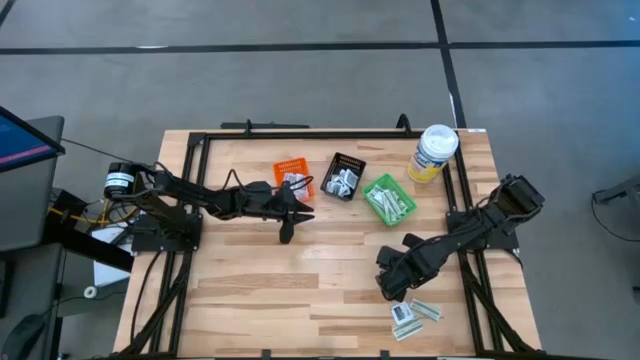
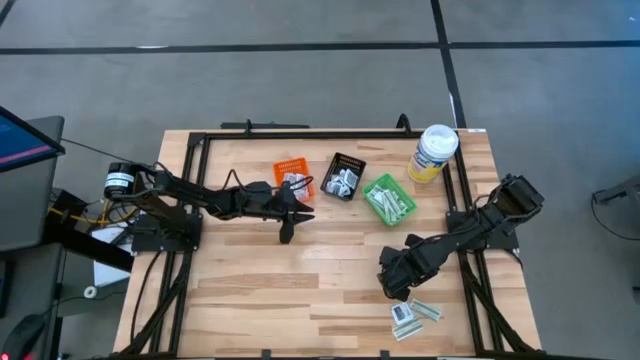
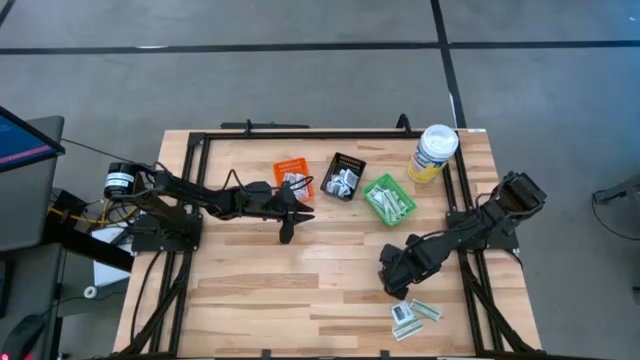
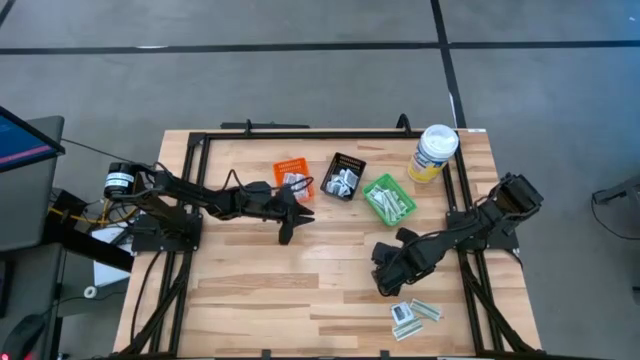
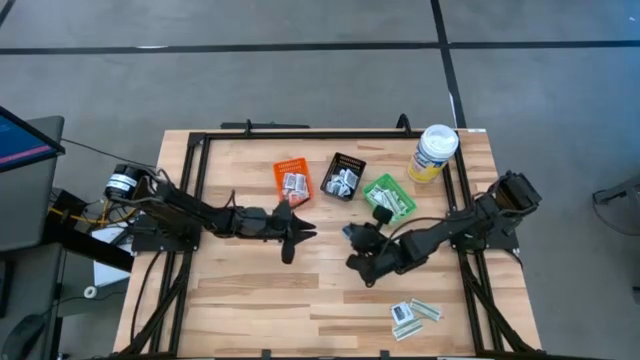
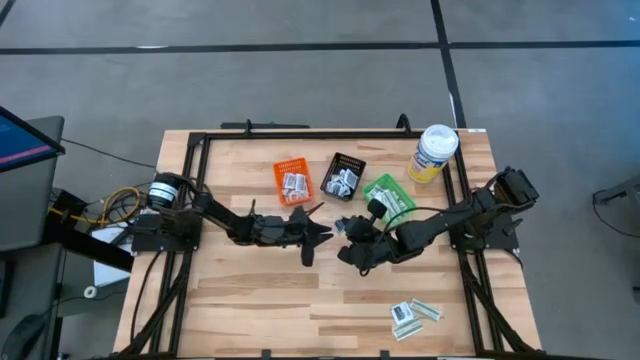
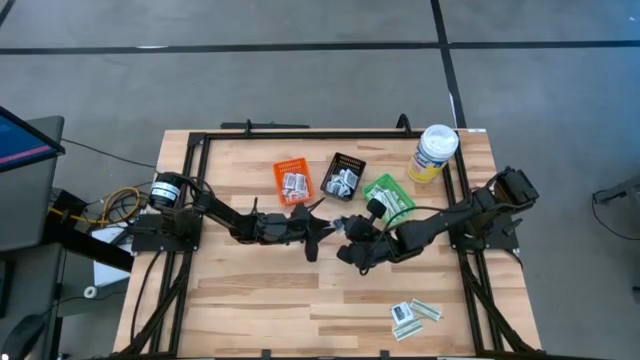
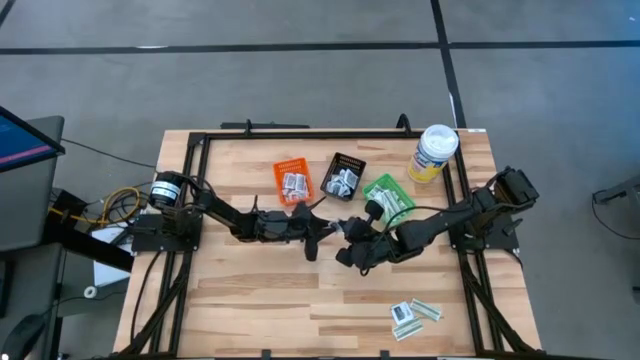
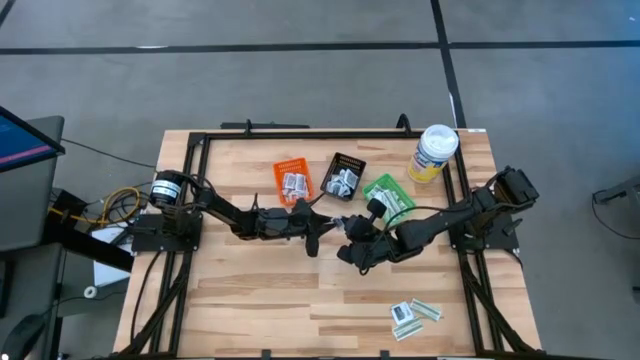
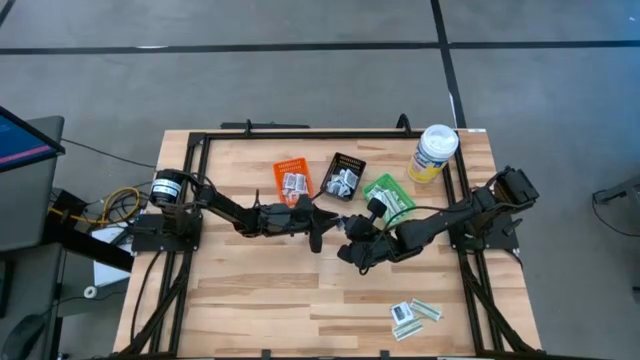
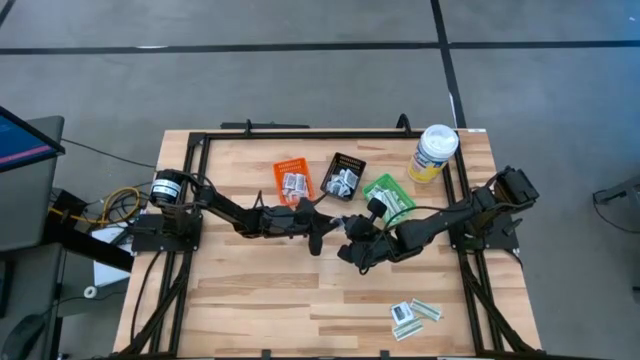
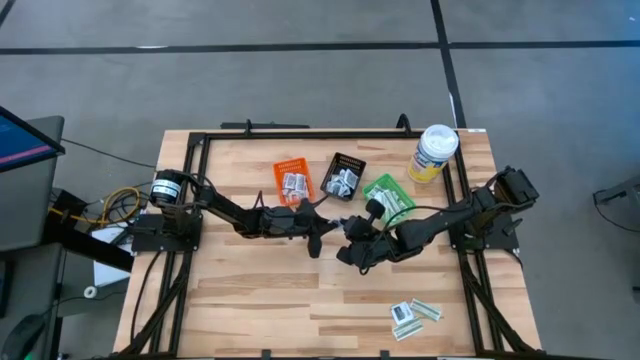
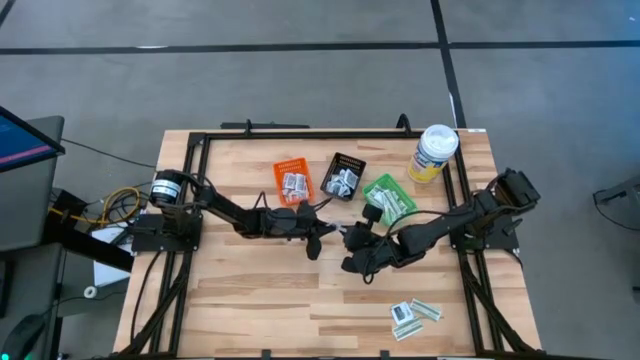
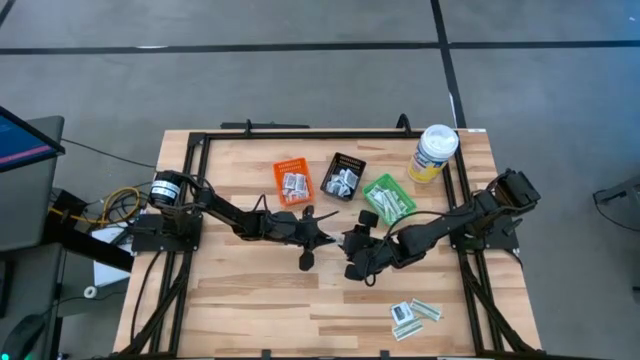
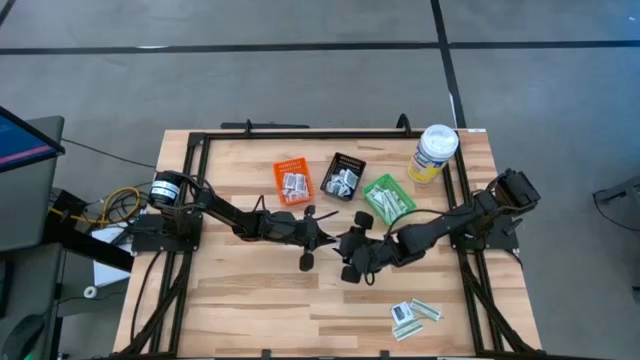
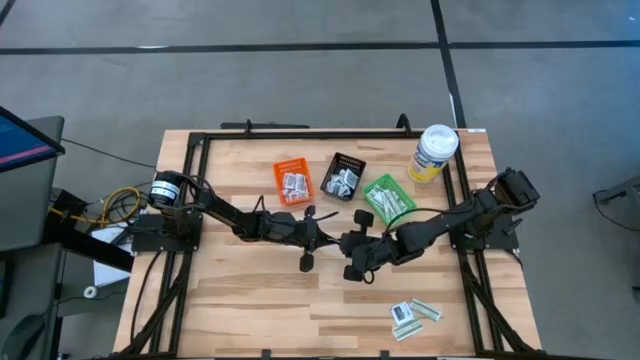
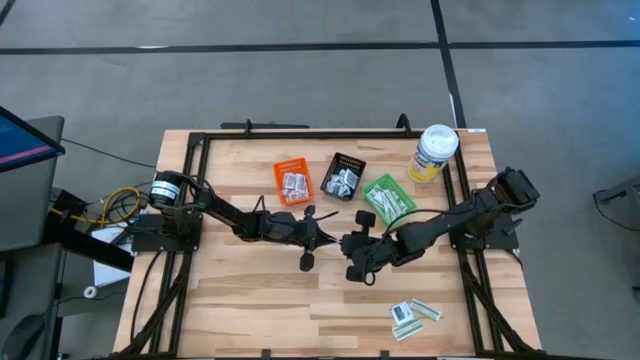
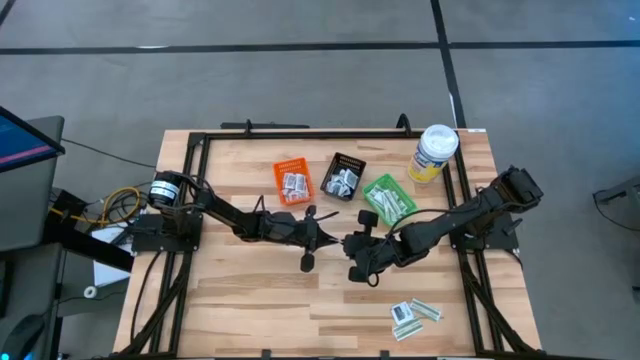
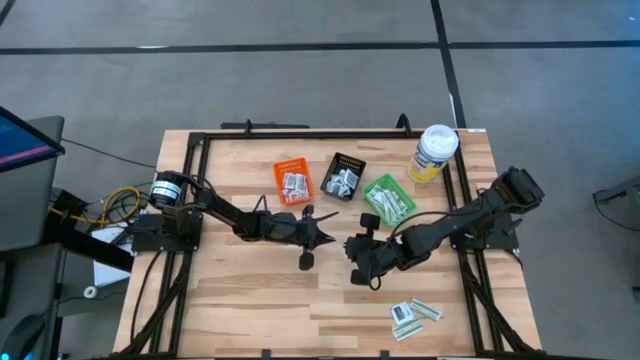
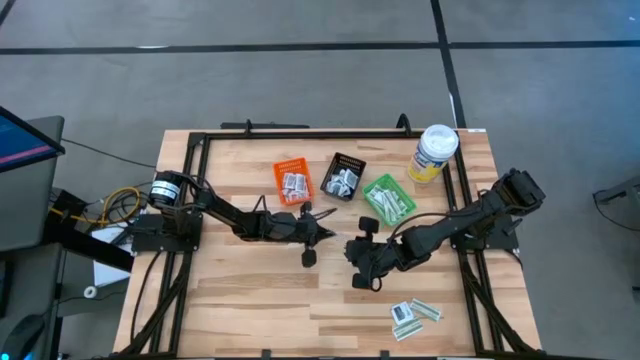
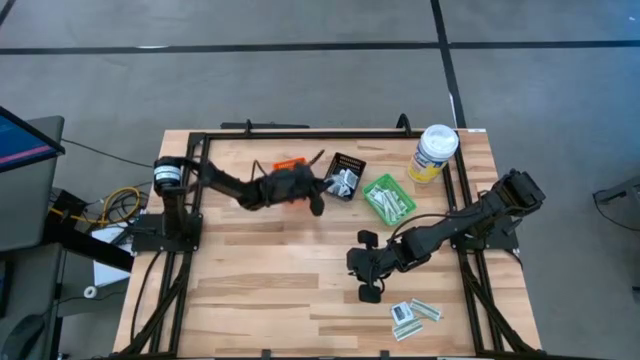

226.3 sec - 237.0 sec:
Task: Pick & Place First Aid Supplies
Put the black towelette pack into the black basket

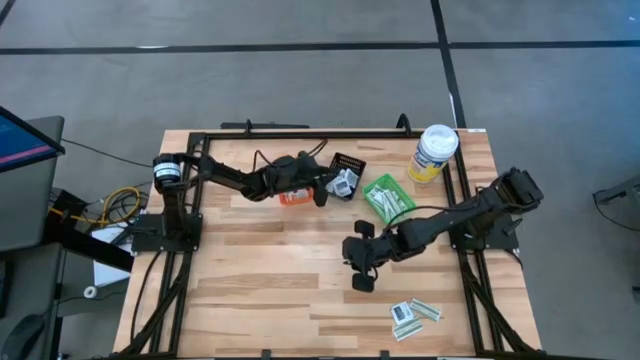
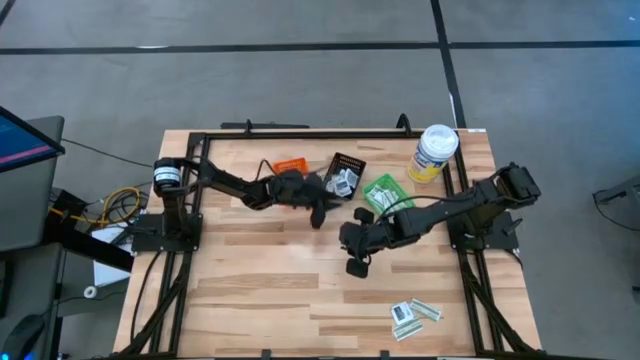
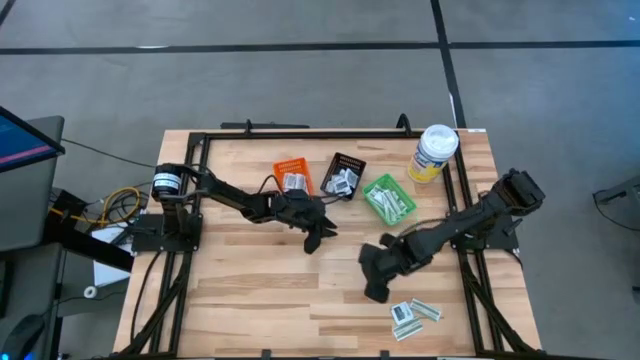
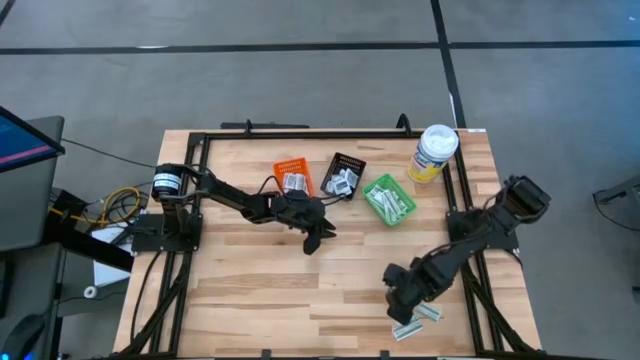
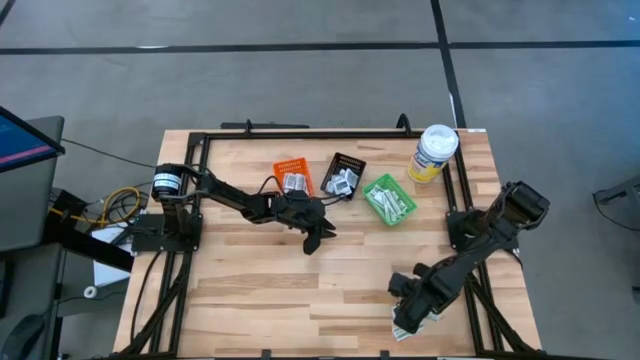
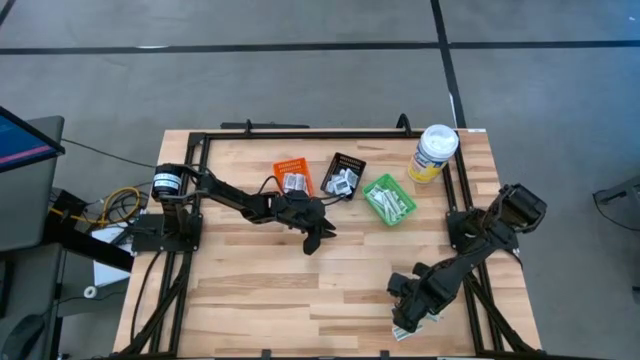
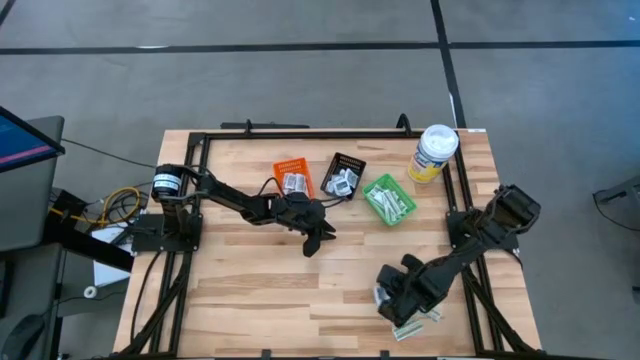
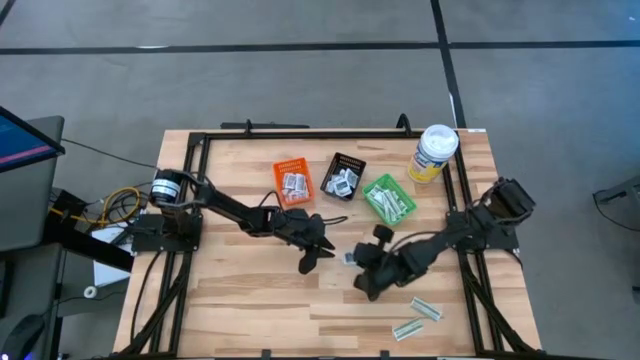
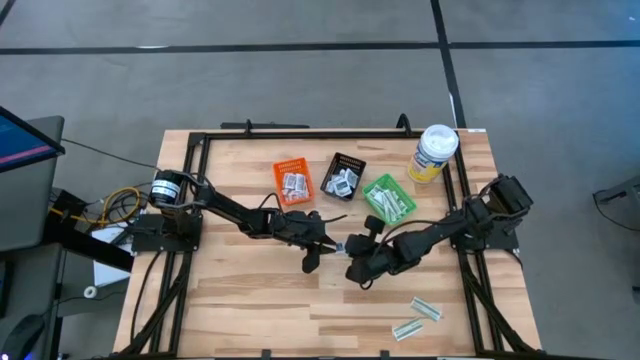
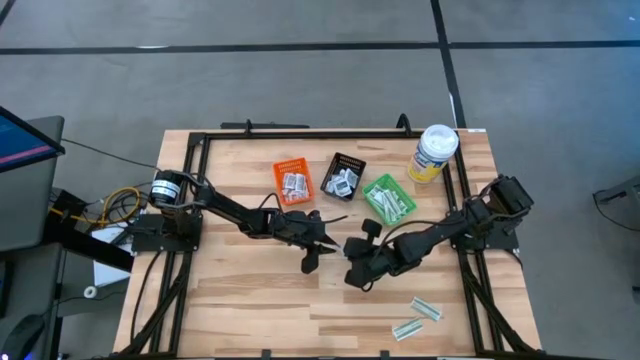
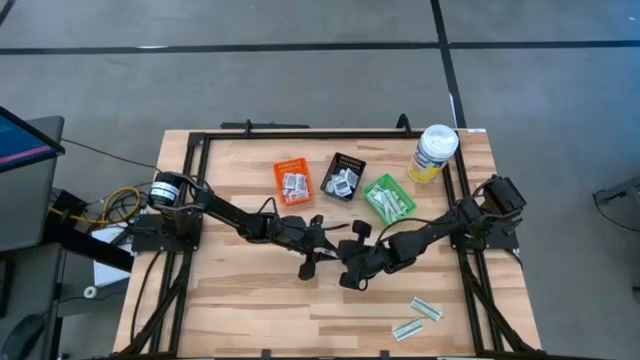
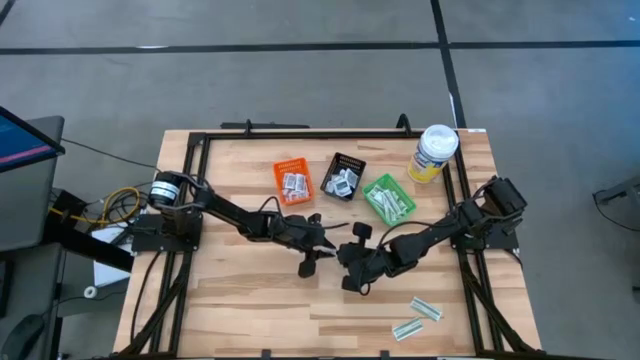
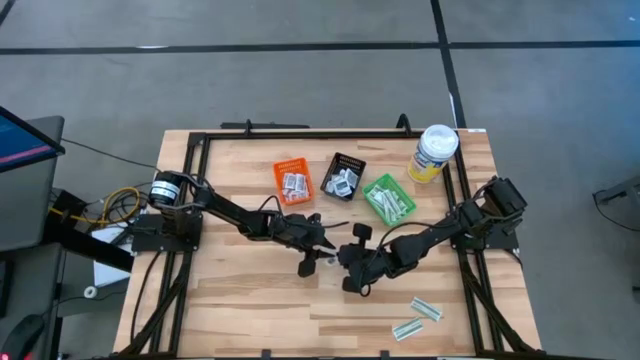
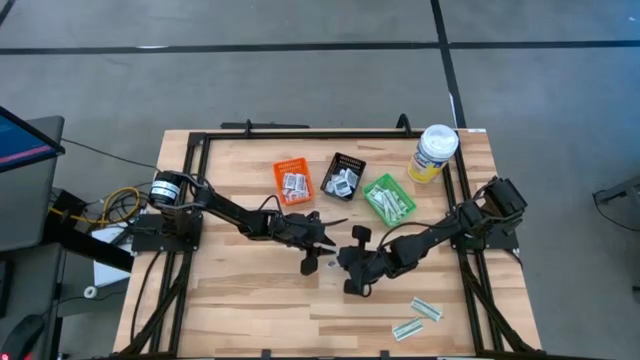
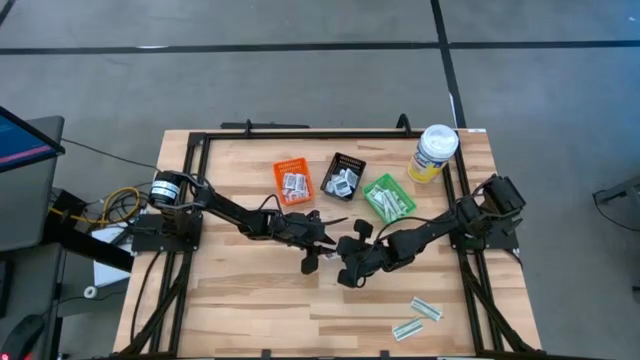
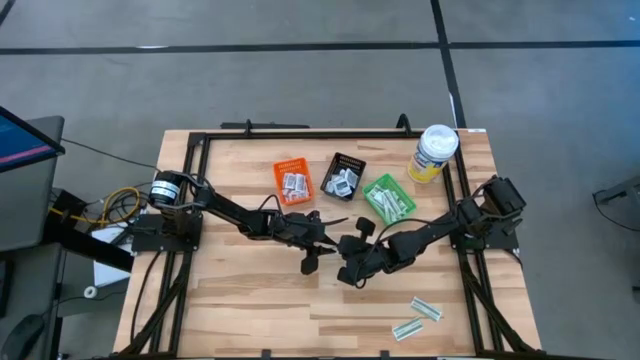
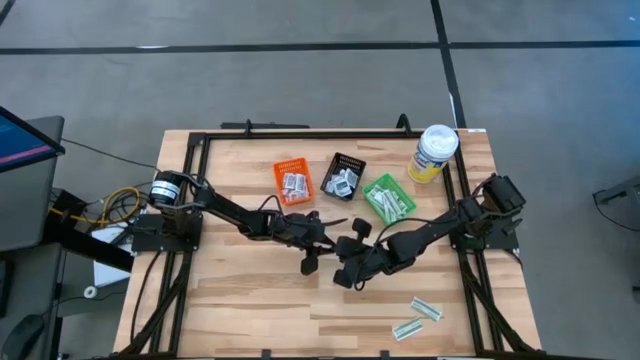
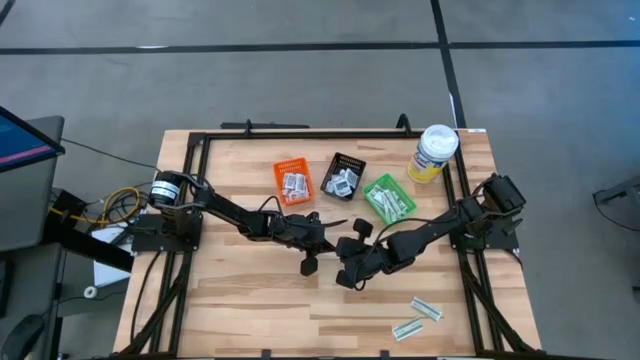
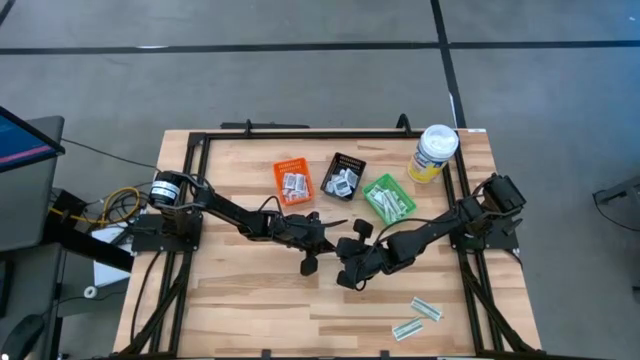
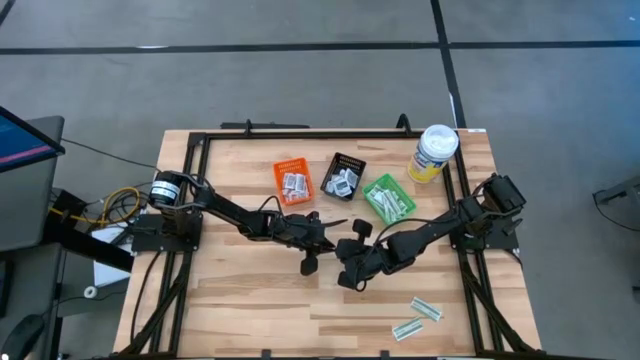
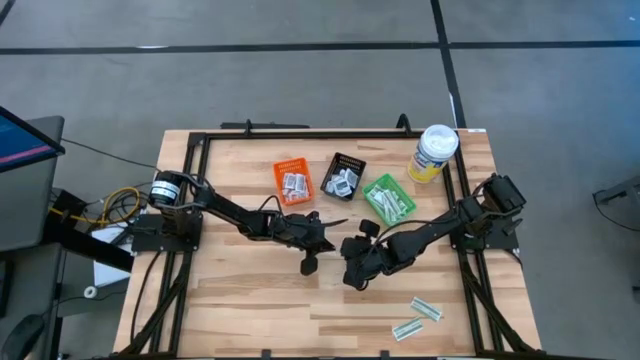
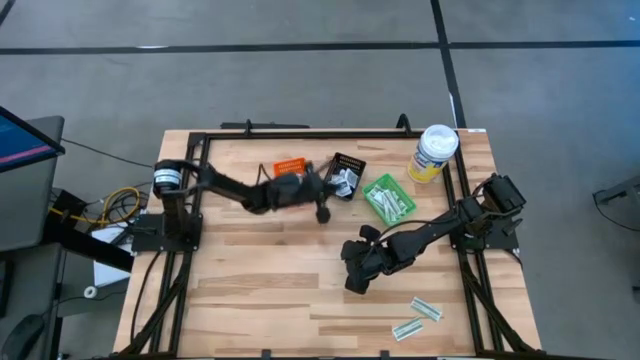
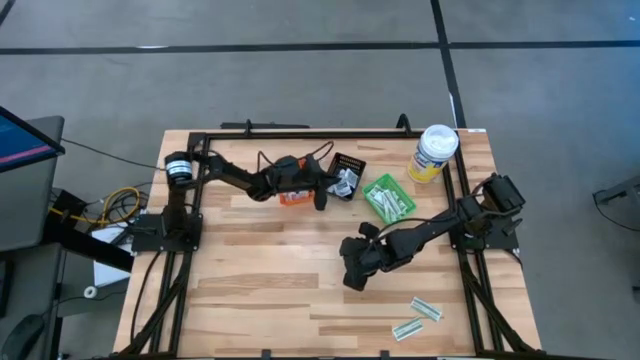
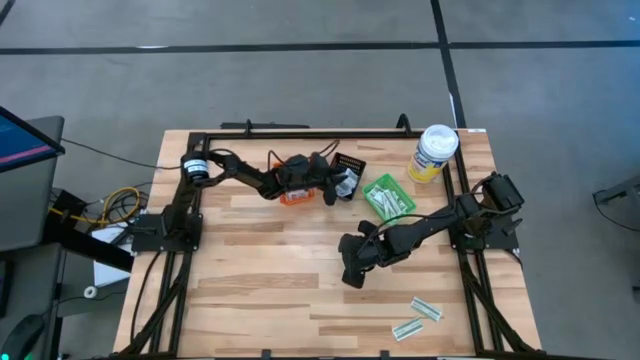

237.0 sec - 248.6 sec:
Put the black towelette pack into the black basket
